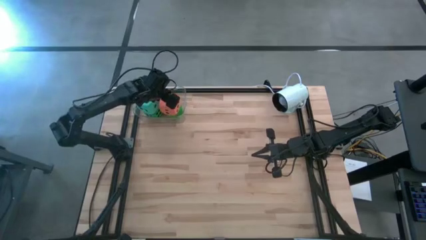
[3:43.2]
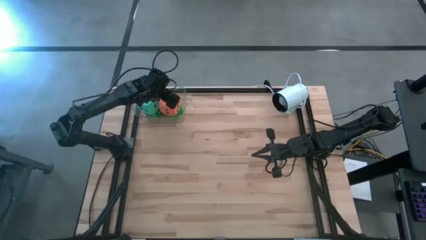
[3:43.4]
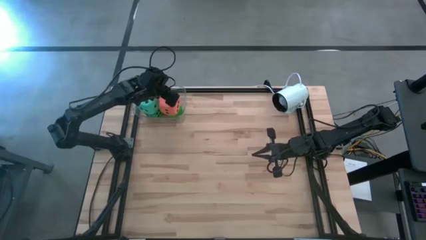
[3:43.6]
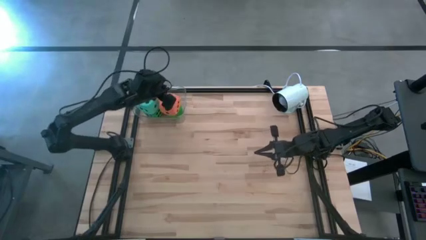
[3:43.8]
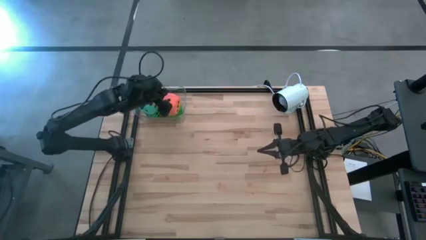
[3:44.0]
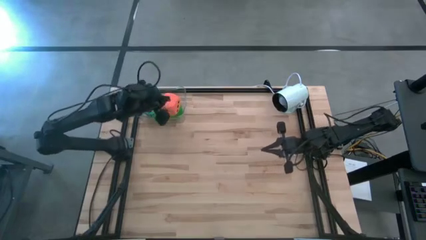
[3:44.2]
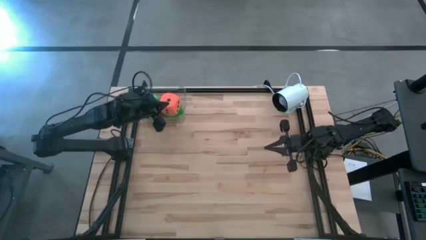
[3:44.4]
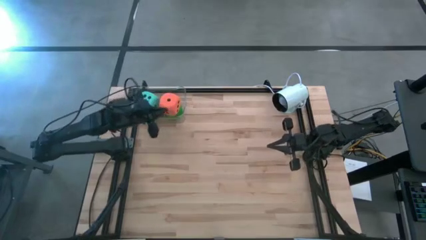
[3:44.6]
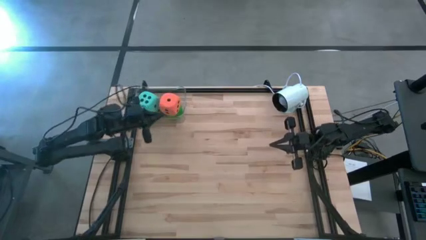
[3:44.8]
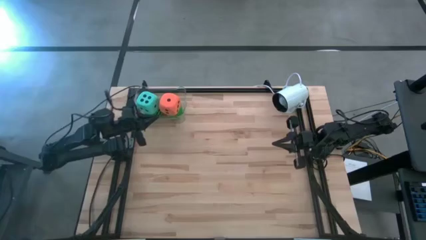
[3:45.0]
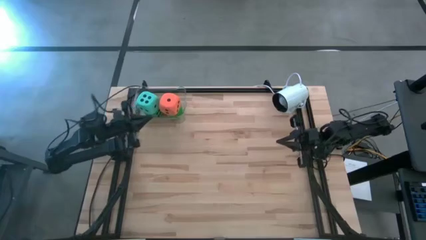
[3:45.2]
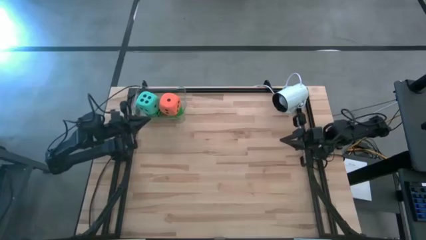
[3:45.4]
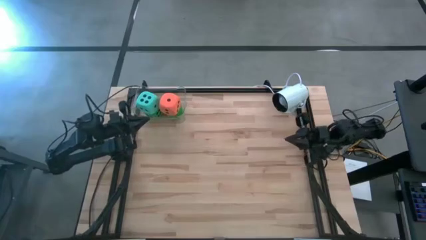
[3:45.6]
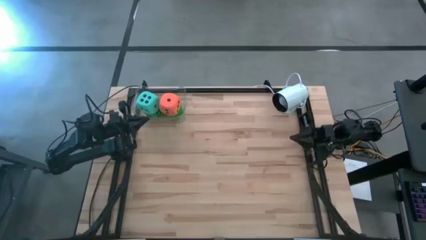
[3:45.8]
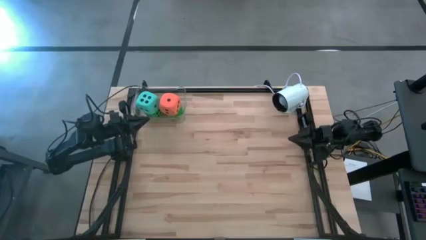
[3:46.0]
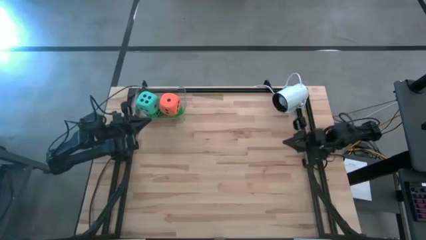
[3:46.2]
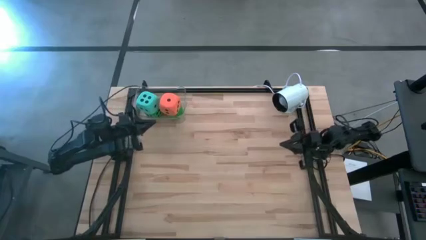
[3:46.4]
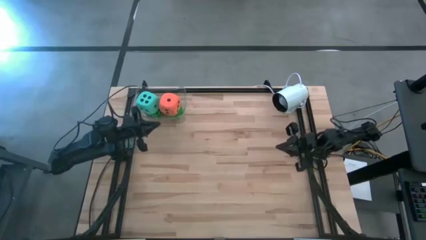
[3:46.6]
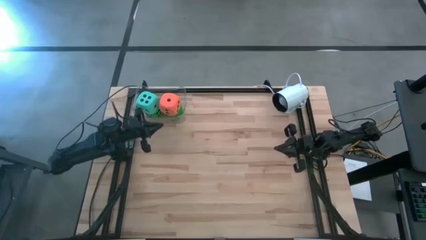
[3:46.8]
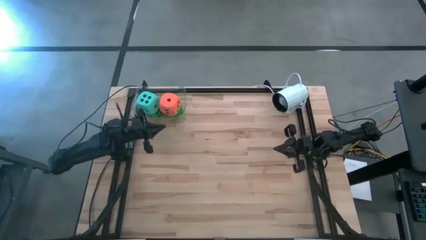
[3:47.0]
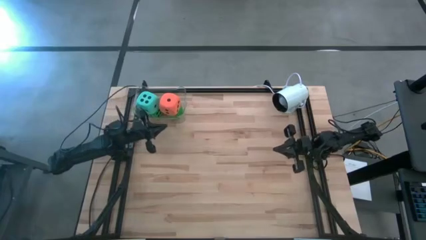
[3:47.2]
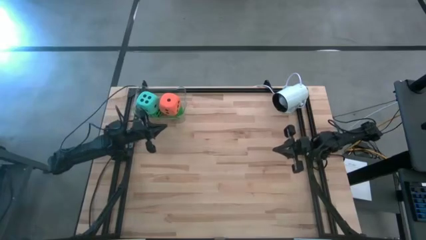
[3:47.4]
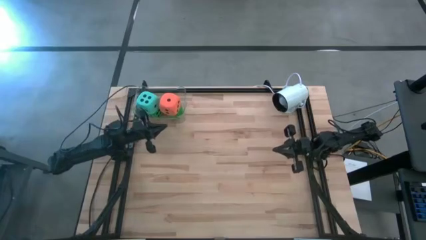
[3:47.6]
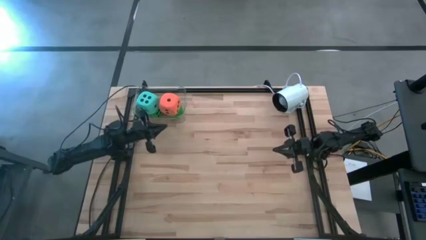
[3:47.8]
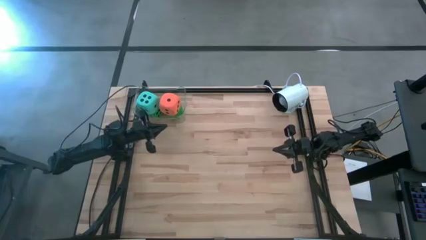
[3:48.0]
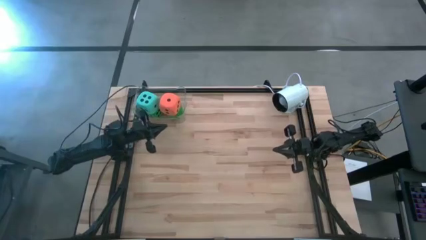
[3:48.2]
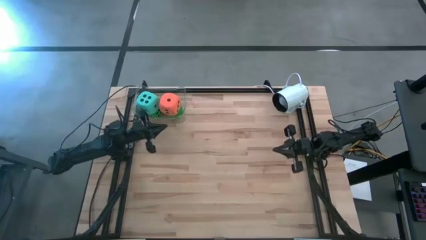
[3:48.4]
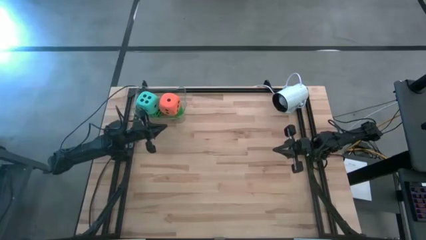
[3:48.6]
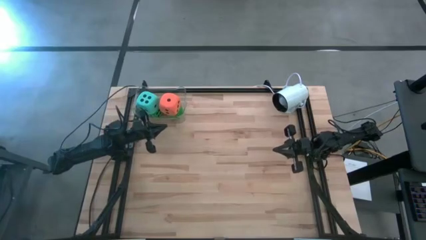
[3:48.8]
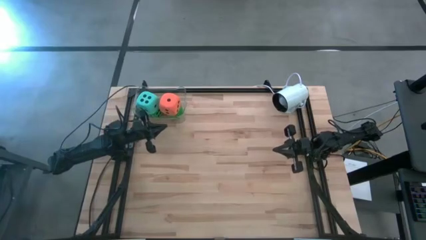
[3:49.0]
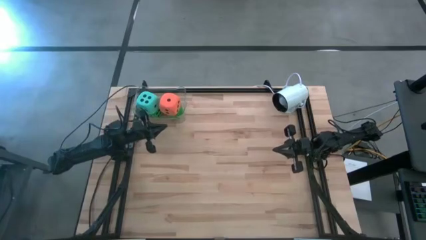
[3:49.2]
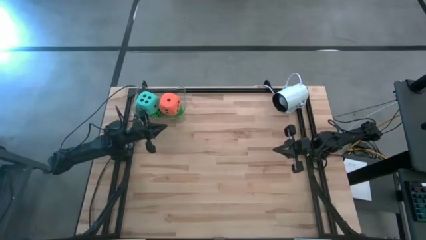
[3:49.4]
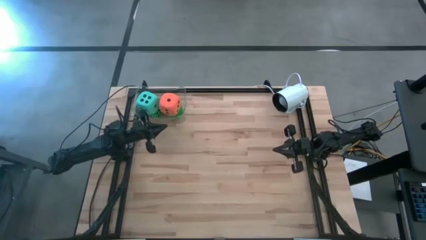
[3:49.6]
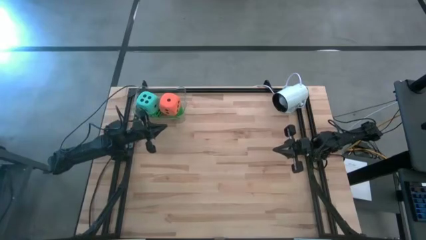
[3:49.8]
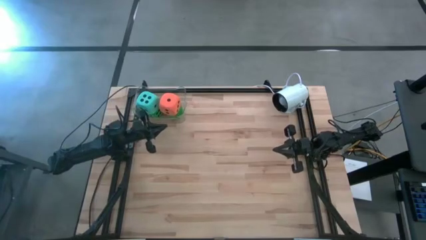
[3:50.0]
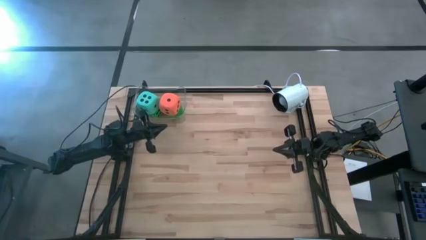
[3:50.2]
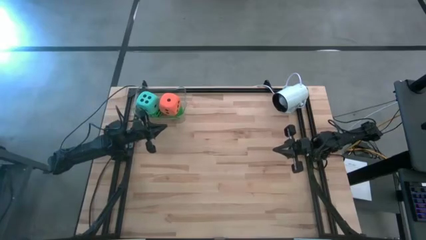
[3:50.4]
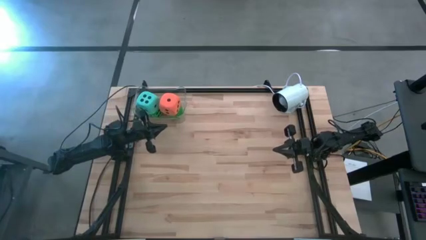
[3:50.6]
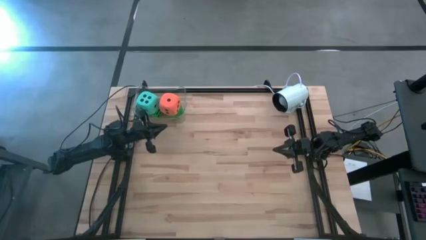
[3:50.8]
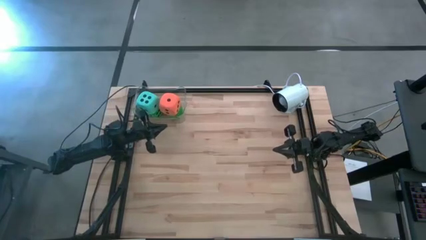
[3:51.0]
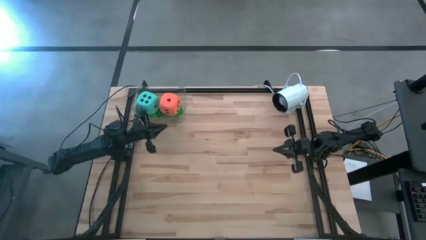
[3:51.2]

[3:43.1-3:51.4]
Task: Pick & Place Dice
Return to Home Position

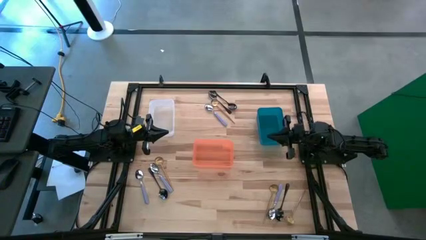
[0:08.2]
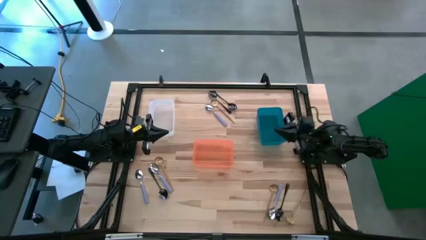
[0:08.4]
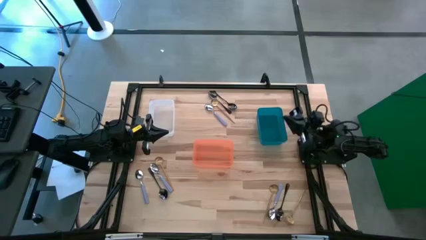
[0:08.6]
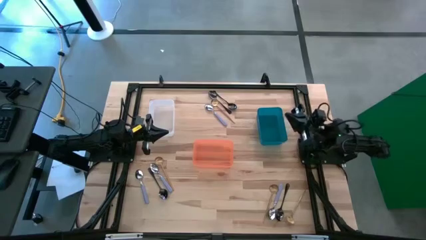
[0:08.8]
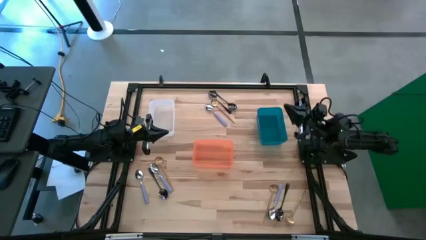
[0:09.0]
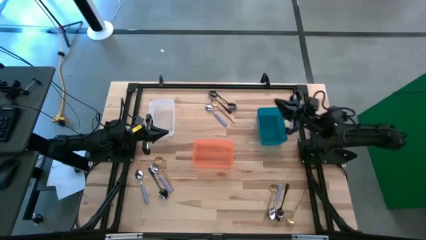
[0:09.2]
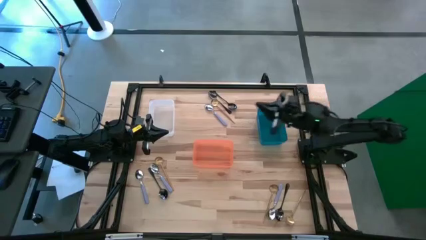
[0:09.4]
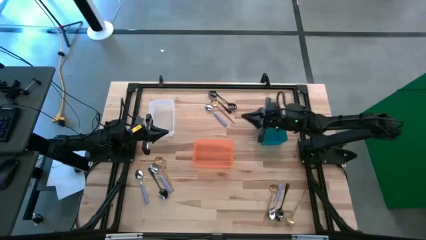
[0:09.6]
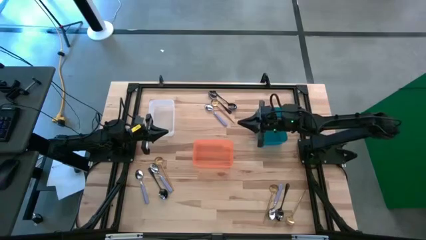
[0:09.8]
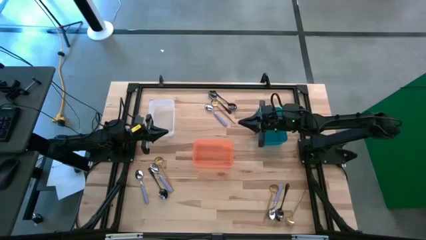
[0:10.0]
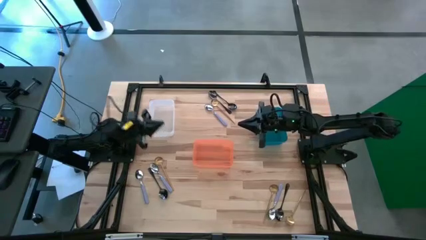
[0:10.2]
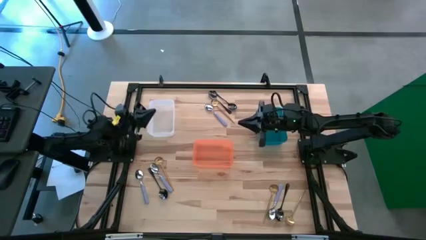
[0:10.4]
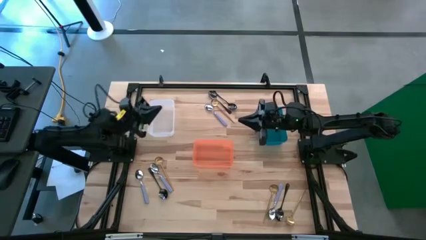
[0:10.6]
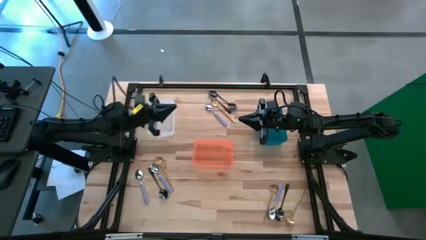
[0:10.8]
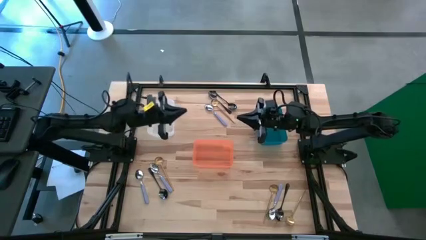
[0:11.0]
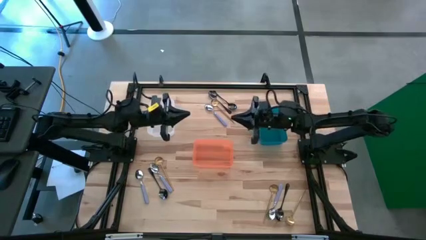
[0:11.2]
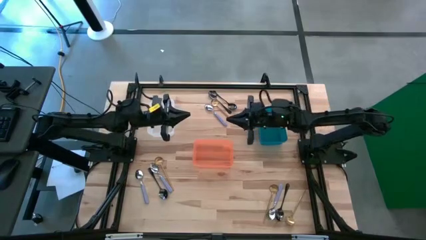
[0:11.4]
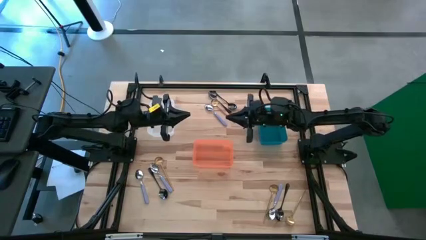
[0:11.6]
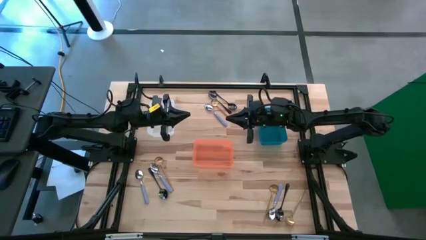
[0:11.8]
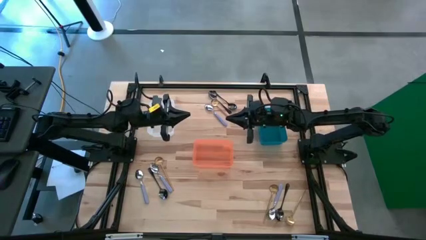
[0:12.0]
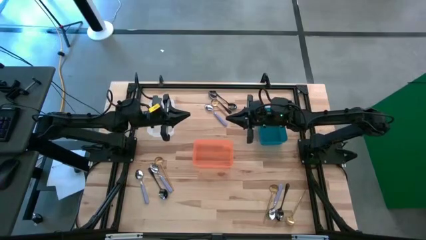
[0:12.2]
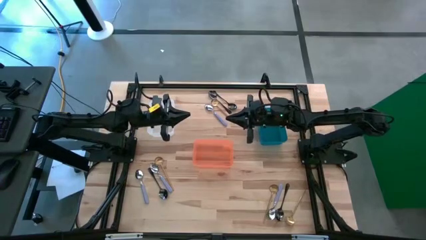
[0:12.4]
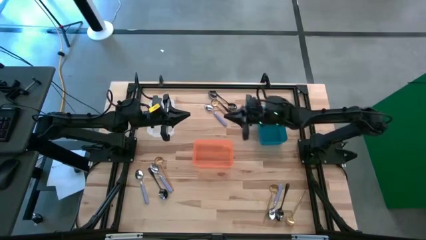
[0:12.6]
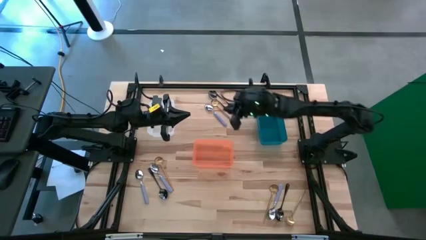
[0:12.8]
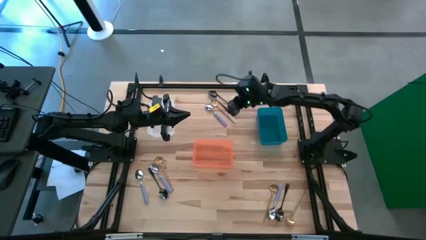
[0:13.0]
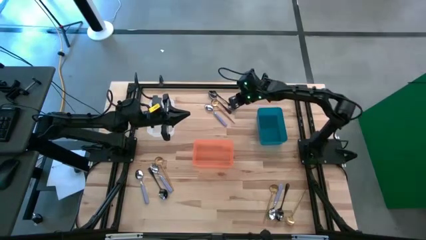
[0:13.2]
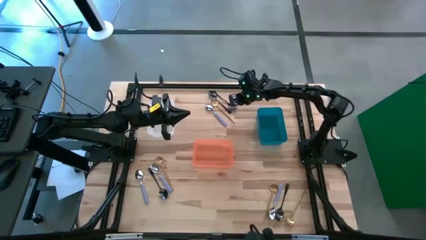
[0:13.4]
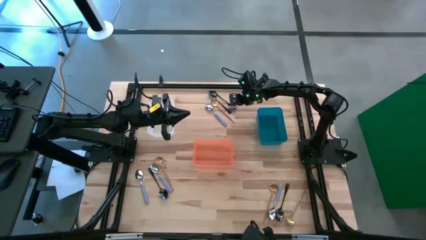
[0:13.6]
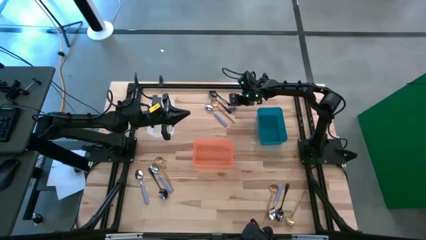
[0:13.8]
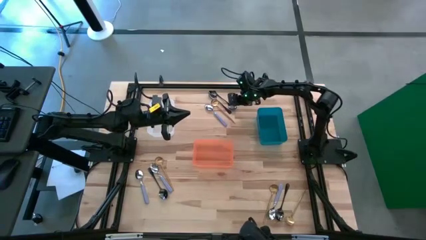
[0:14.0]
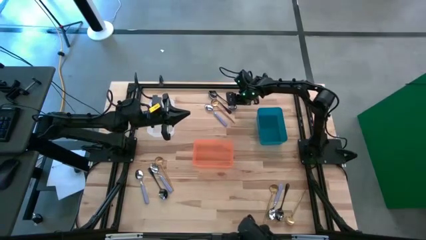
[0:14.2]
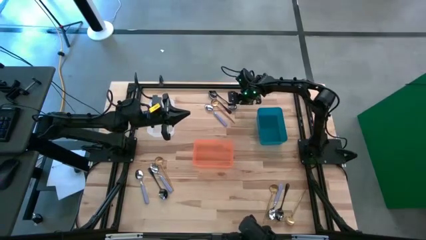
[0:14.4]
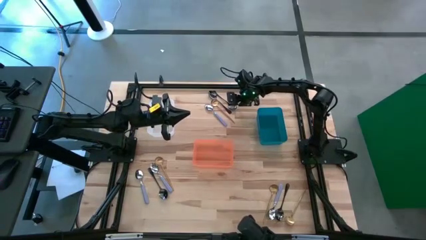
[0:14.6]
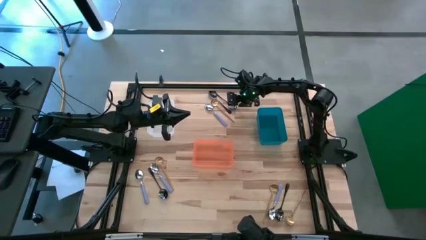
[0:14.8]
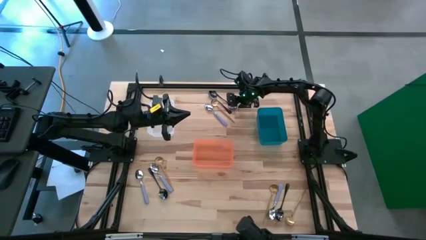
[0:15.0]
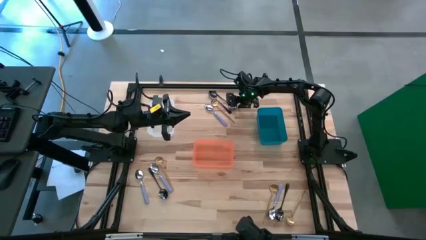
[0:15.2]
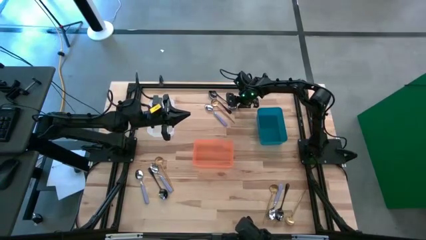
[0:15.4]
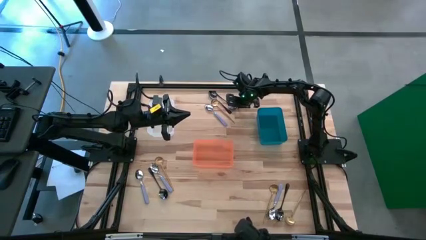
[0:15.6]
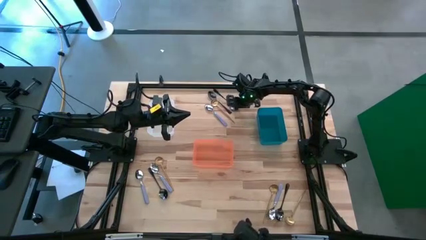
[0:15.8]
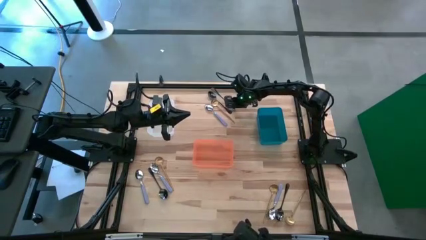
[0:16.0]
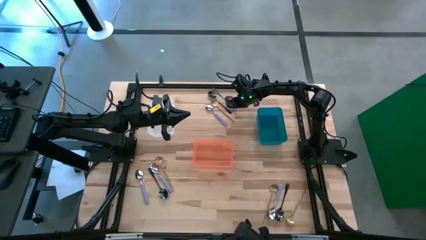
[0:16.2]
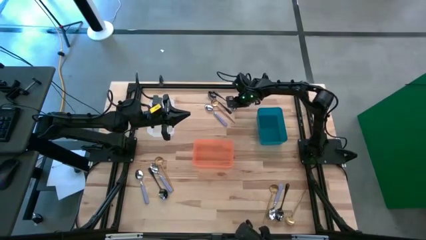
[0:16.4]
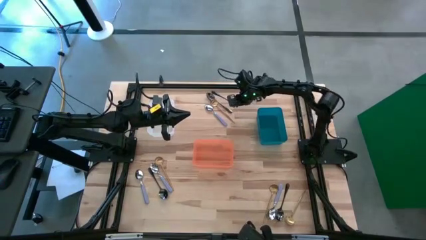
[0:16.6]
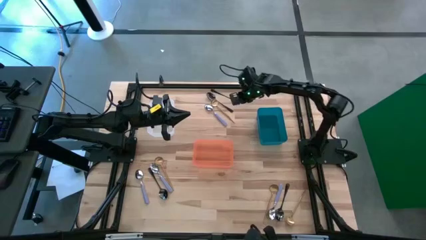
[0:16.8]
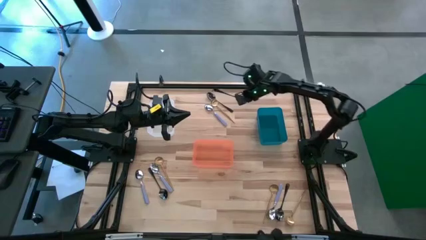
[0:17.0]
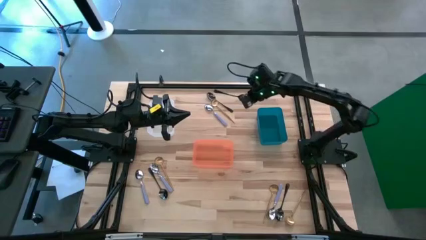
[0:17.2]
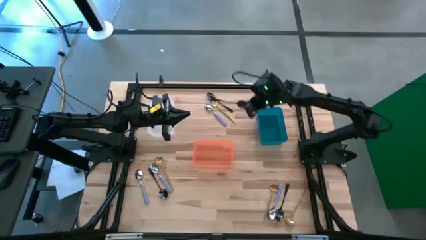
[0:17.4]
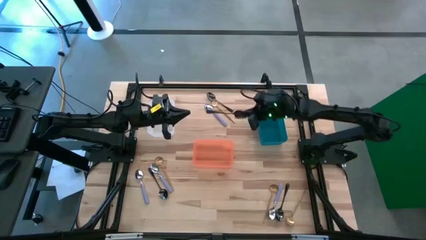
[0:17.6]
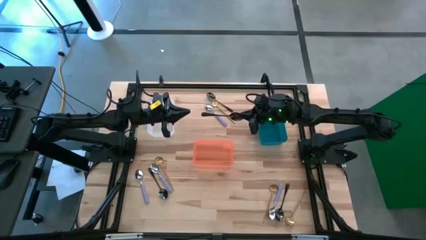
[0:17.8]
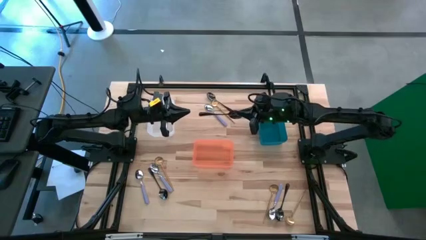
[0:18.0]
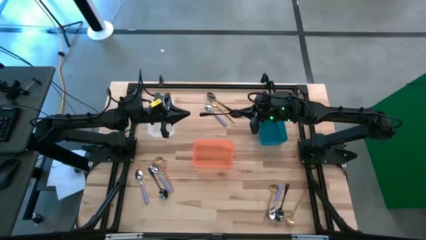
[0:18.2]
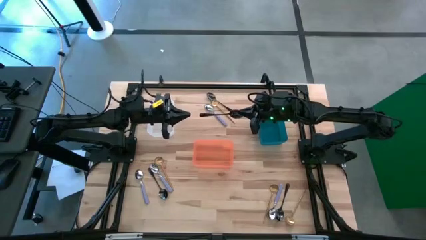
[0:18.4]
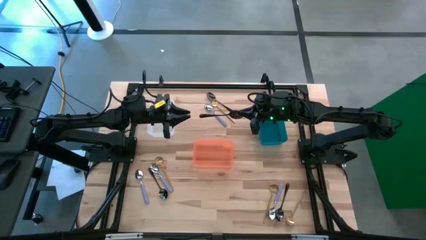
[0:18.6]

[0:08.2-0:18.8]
Task: Sort silverware by color (type)
Put the top center black spoon into the white bin
